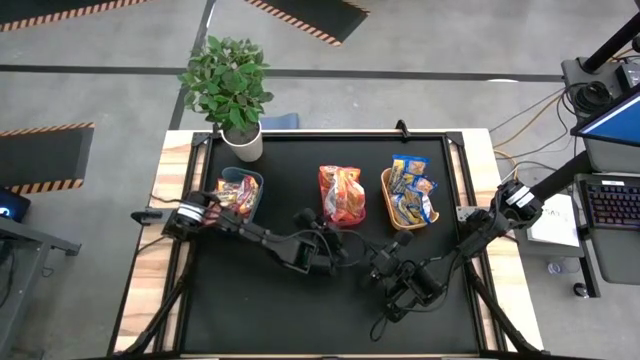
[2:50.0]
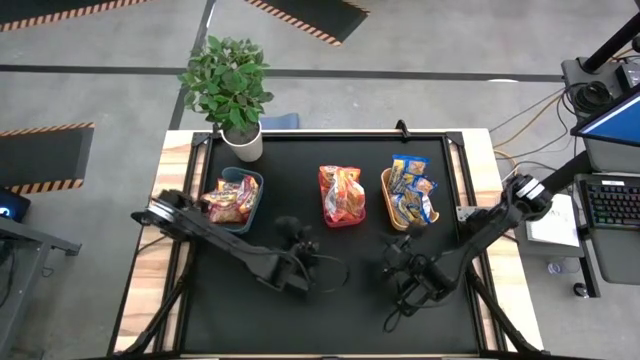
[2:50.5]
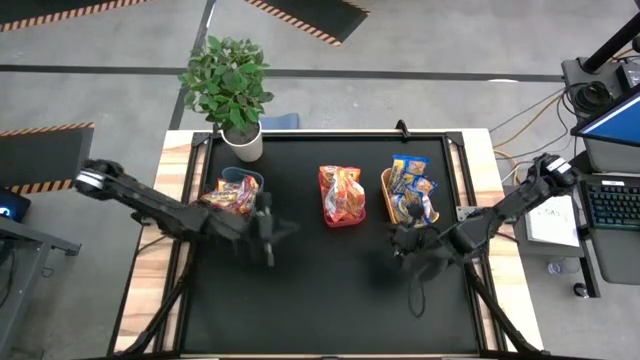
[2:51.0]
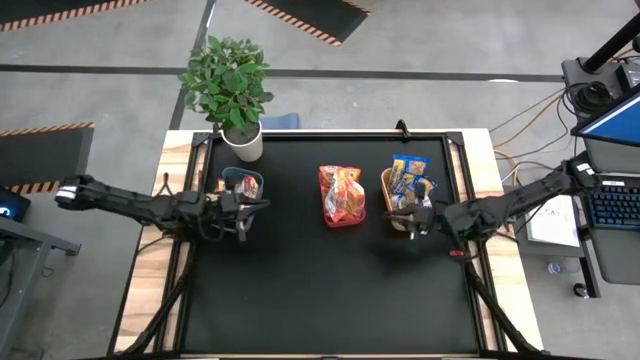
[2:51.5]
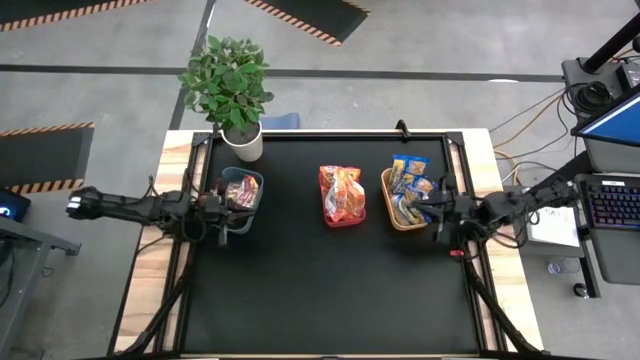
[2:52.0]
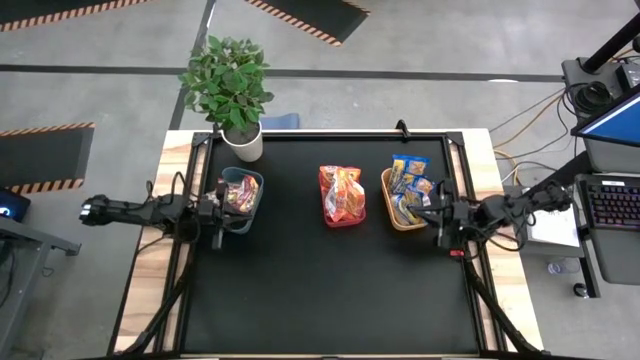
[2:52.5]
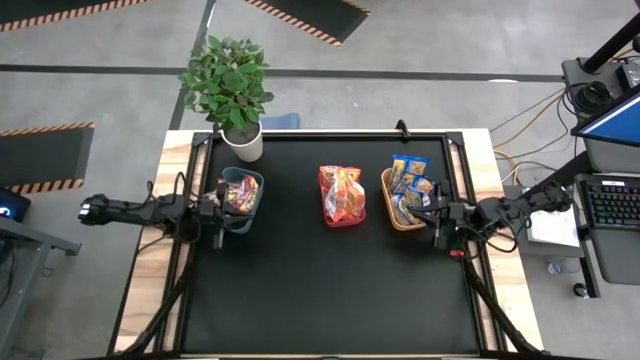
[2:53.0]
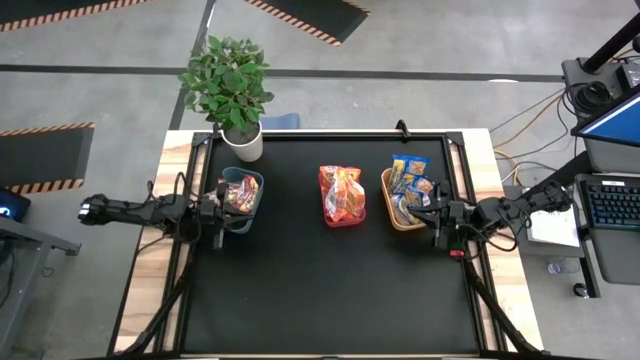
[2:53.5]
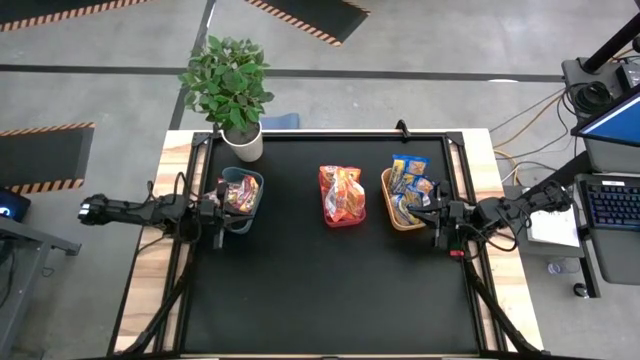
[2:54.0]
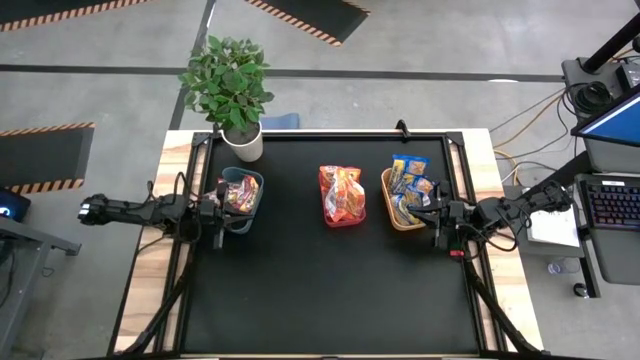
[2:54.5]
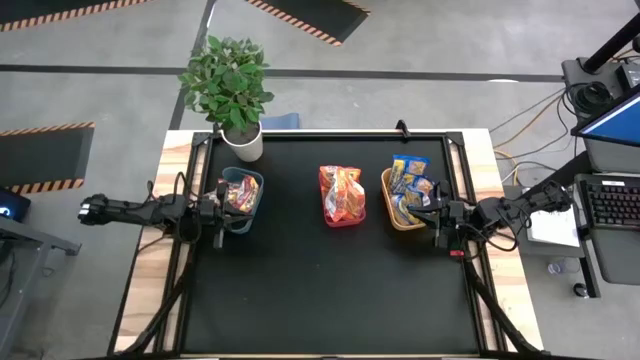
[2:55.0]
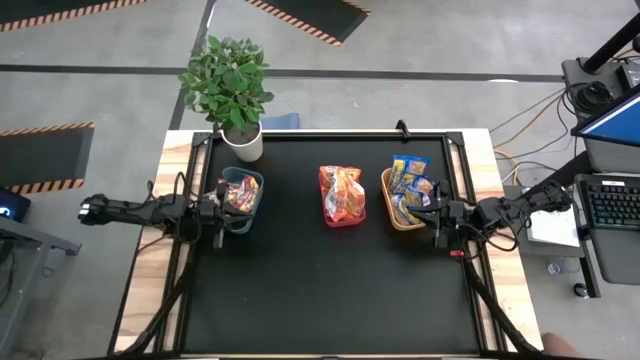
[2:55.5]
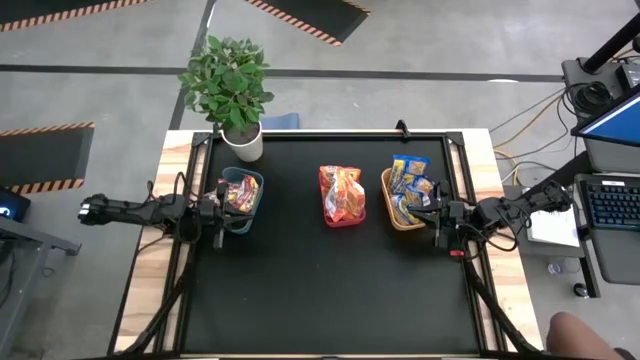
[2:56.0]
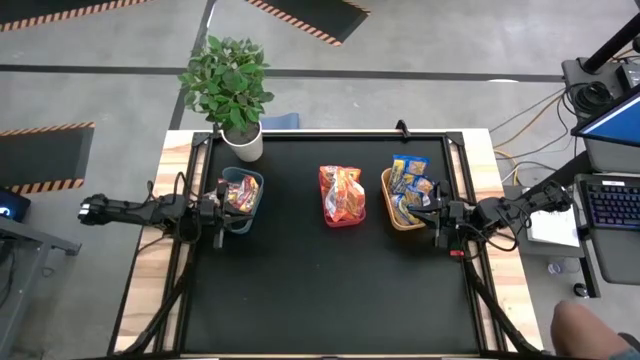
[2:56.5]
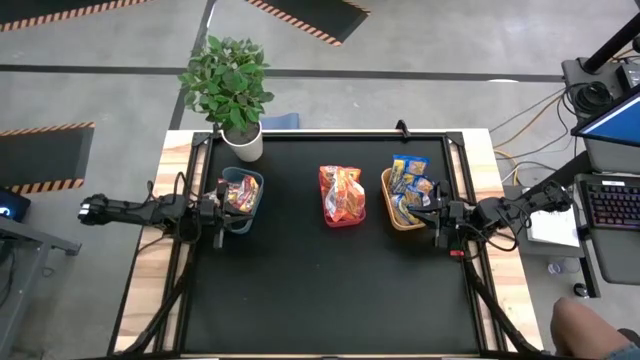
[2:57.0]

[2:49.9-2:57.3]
Task: Sort Maruchan noodles
Return to Home Position

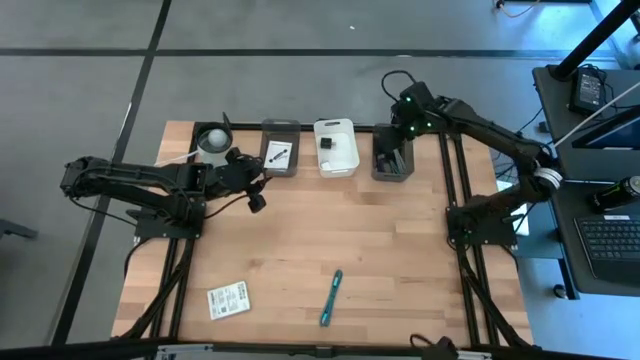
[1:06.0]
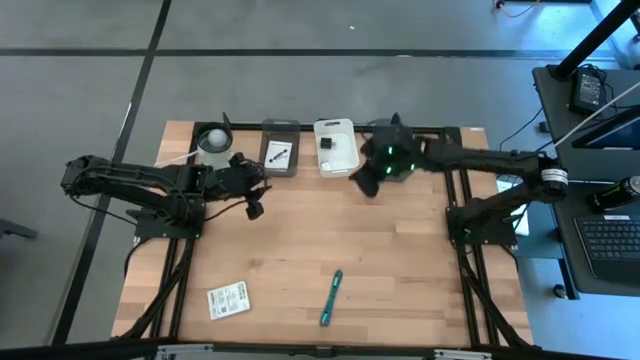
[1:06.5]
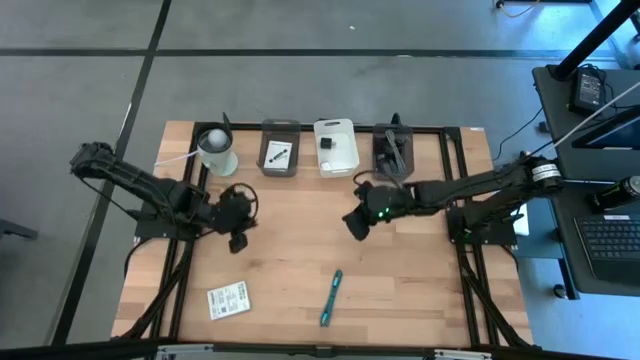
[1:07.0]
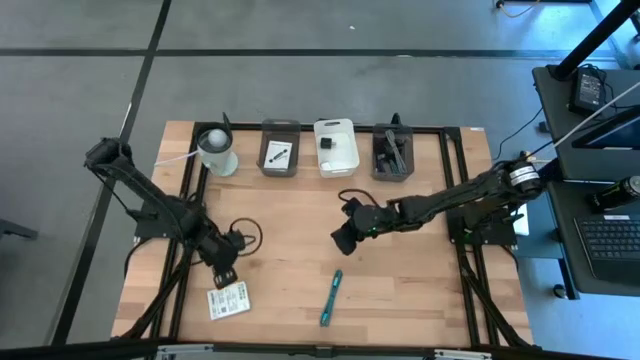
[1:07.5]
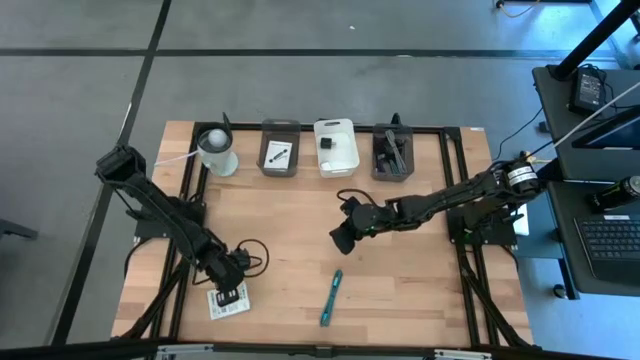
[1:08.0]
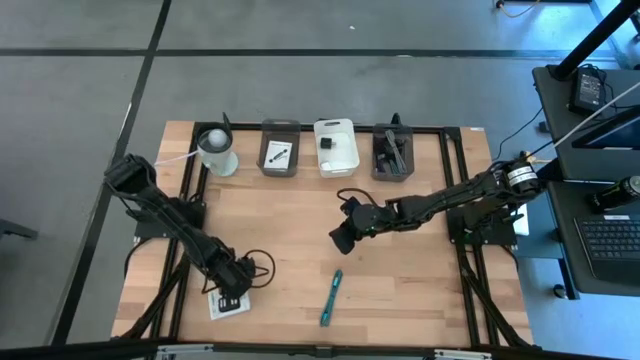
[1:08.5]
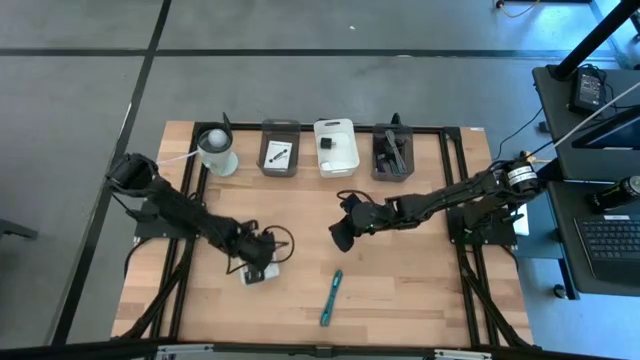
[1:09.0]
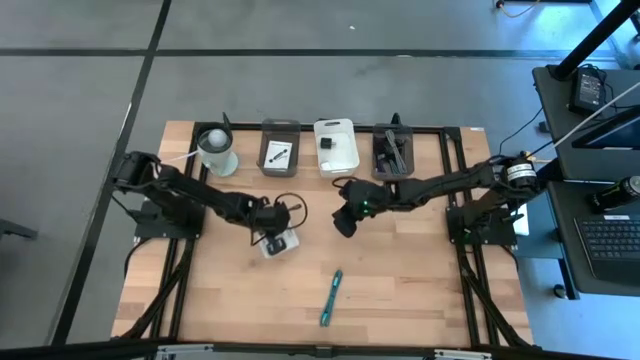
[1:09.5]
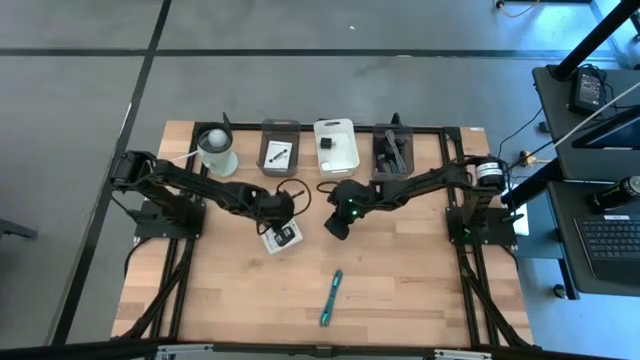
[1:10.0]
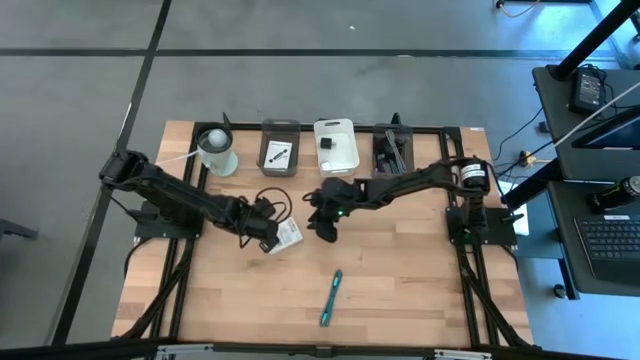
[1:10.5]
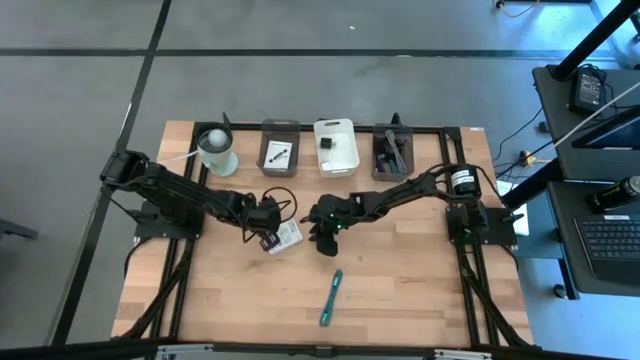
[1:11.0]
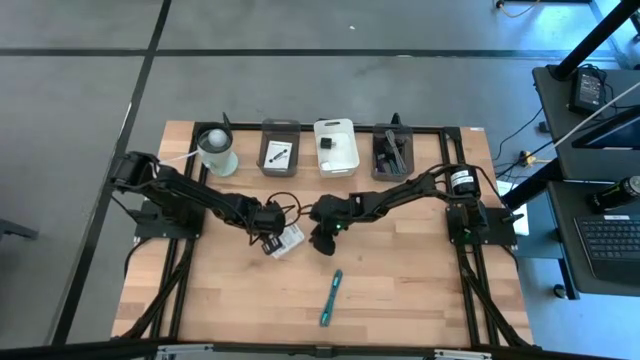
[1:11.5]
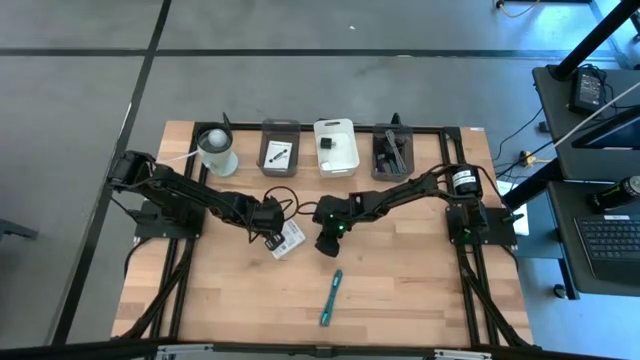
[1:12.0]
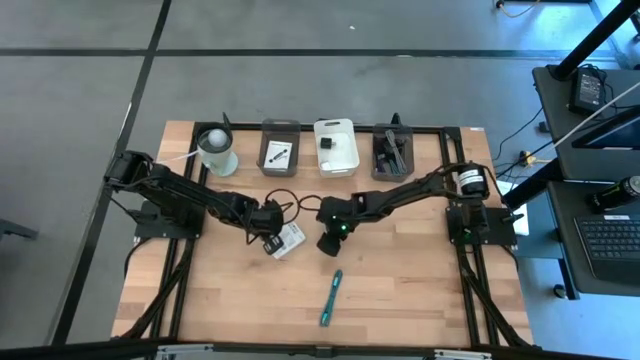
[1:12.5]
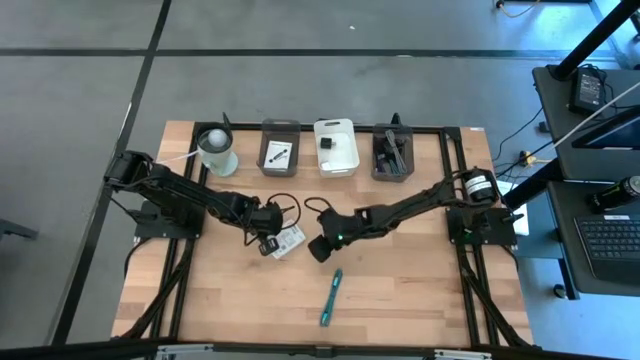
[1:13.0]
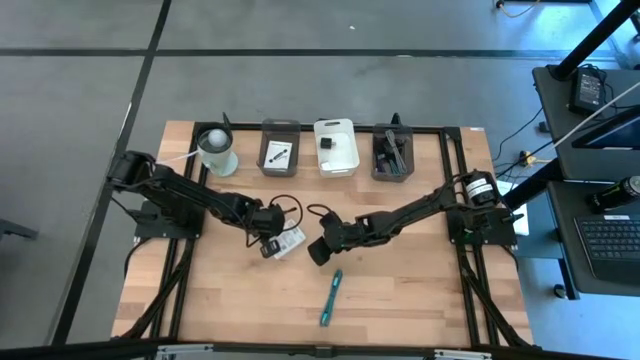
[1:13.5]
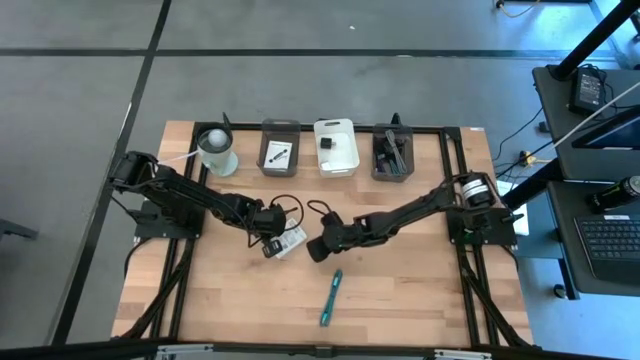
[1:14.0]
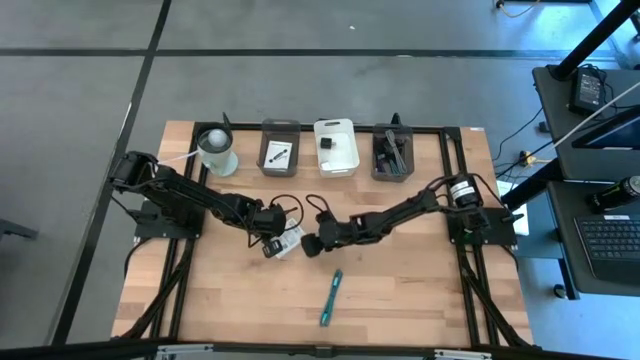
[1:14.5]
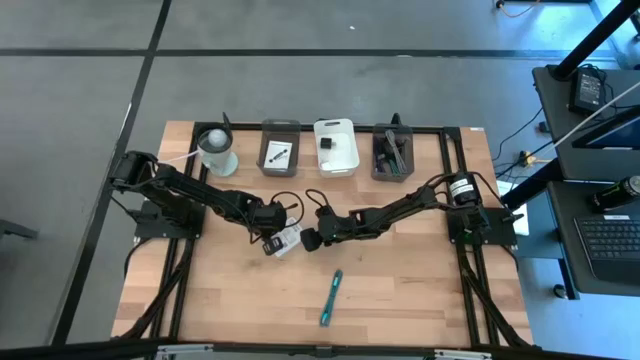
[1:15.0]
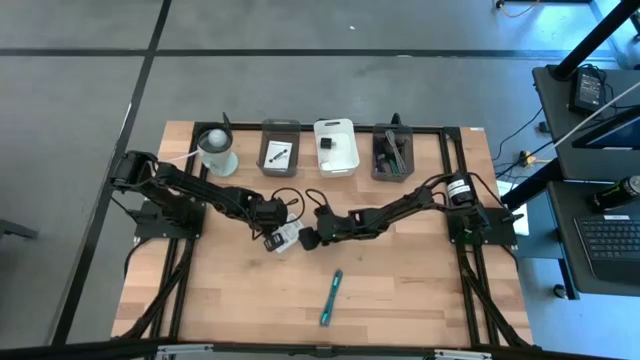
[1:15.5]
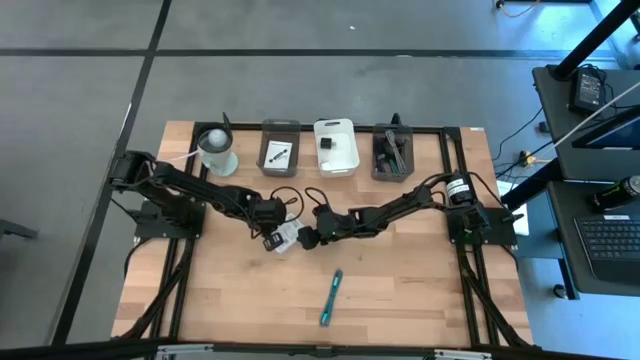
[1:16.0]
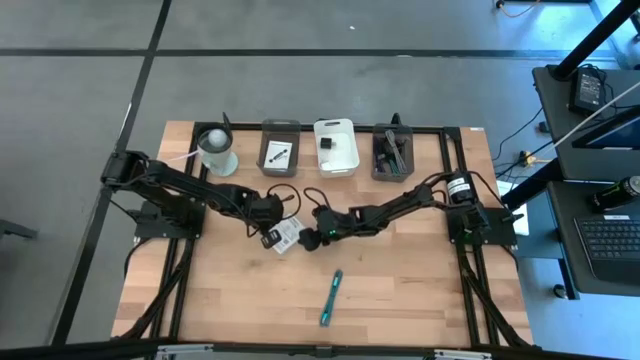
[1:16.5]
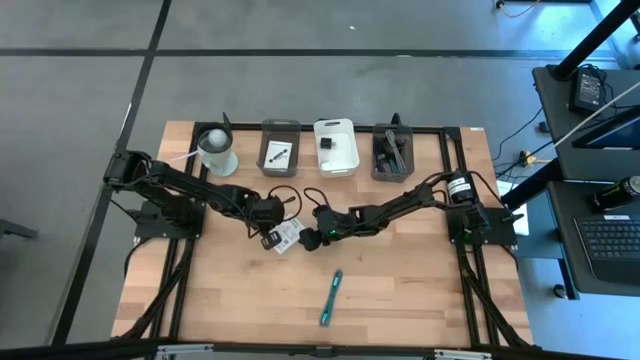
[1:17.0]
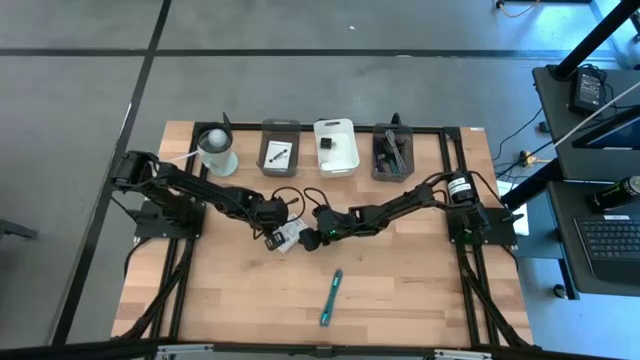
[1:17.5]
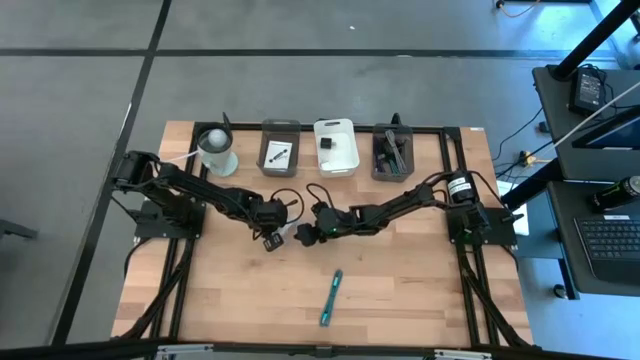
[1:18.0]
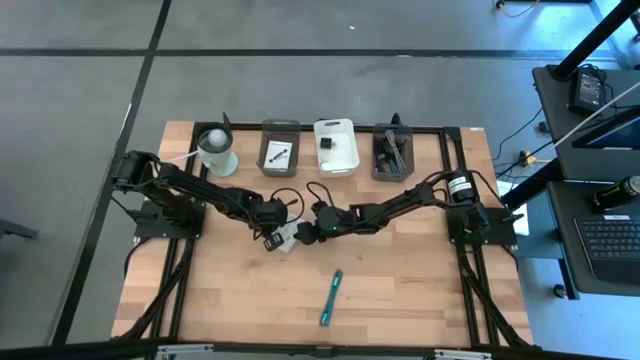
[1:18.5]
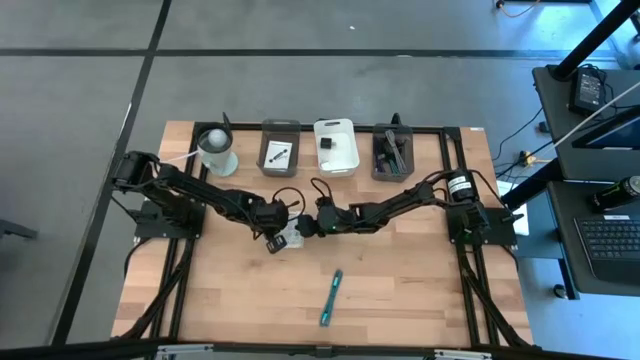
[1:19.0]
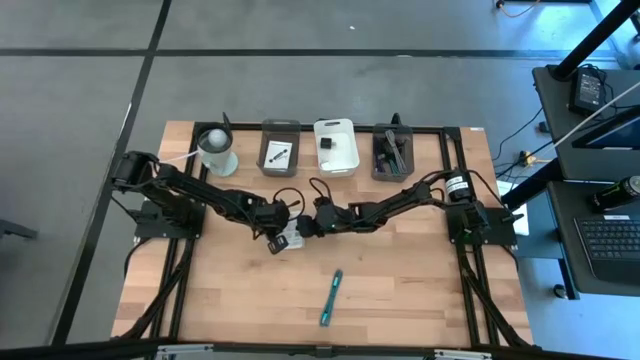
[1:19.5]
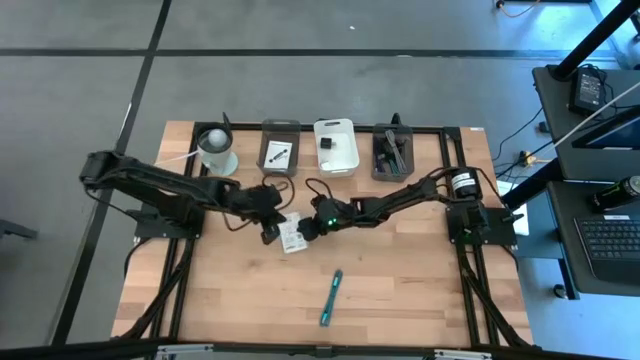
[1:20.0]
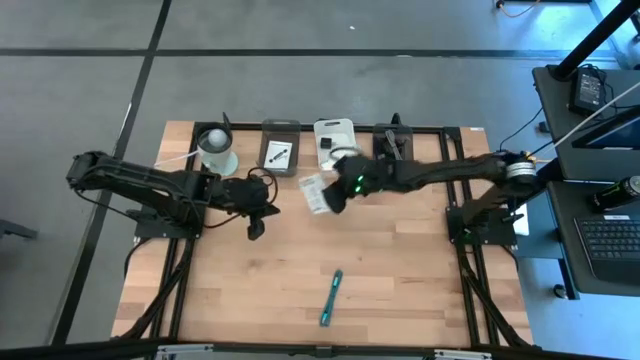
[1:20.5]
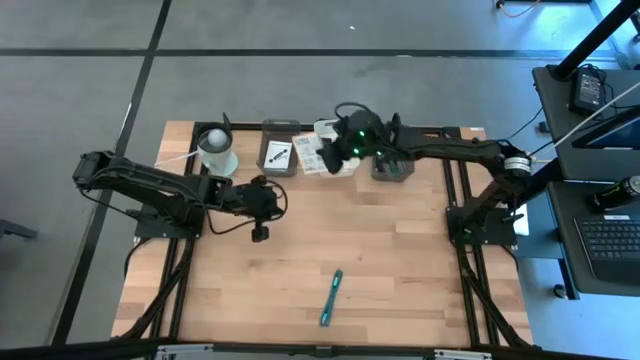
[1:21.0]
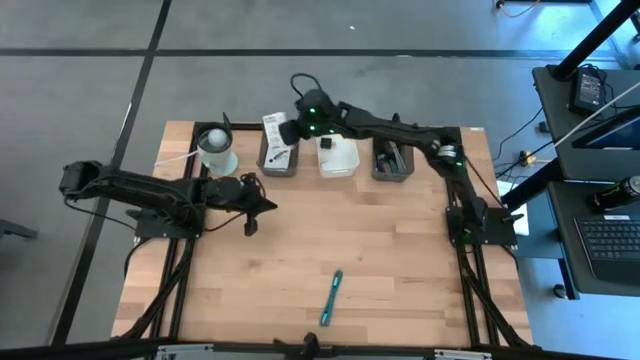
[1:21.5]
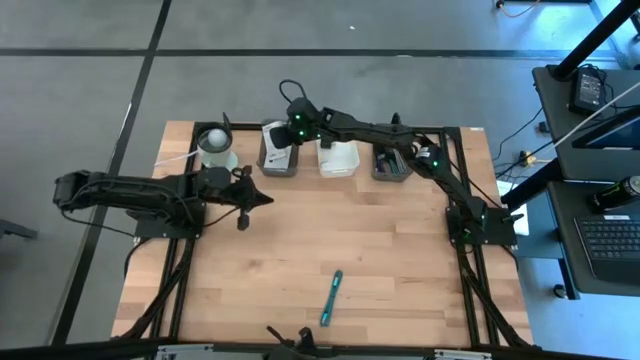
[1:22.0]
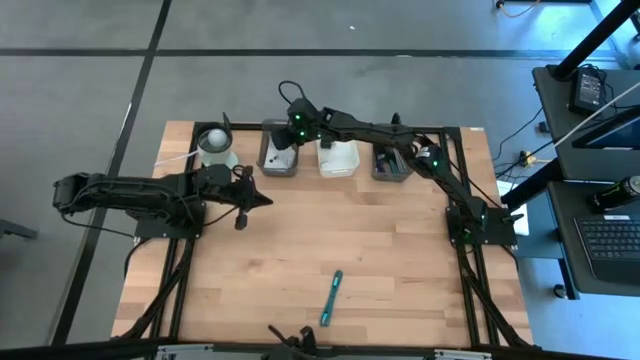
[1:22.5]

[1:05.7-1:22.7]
Task: Pick and place items into bin
Put the card reader box into the left black bin
